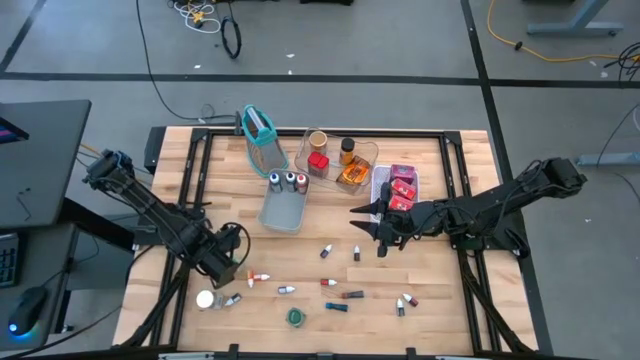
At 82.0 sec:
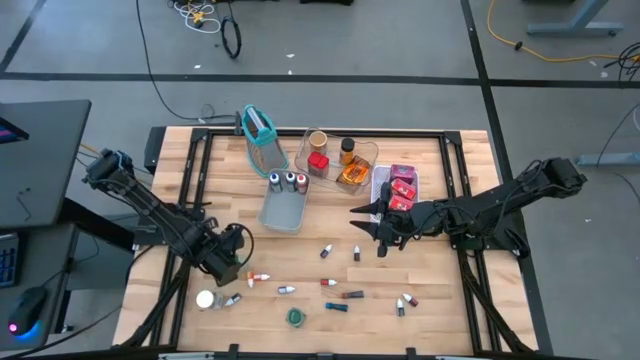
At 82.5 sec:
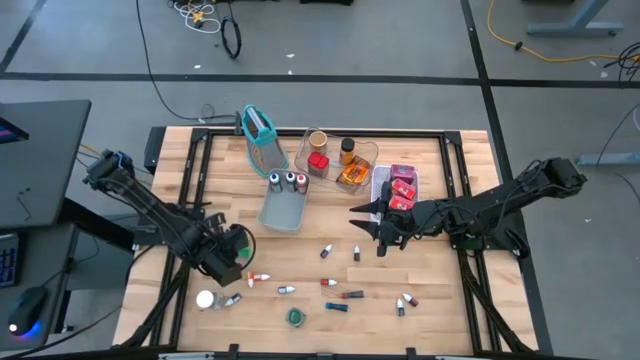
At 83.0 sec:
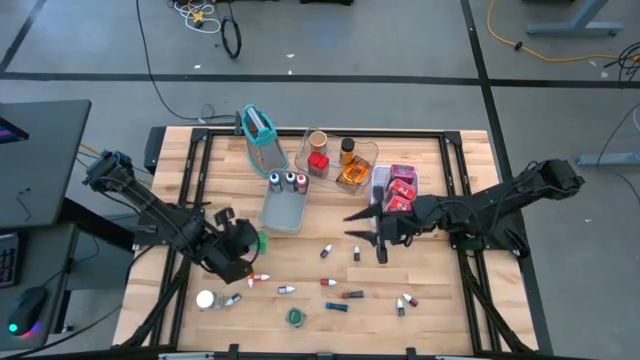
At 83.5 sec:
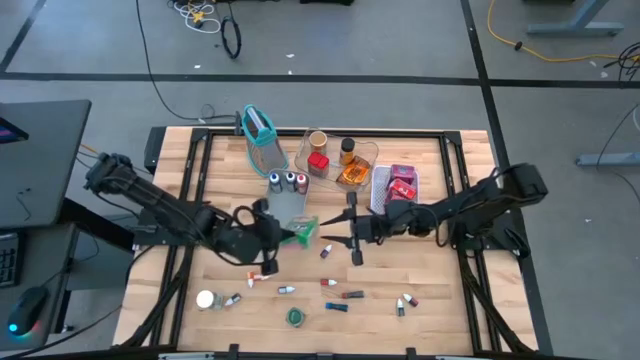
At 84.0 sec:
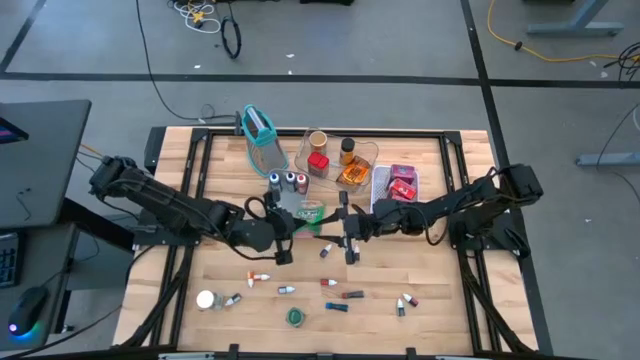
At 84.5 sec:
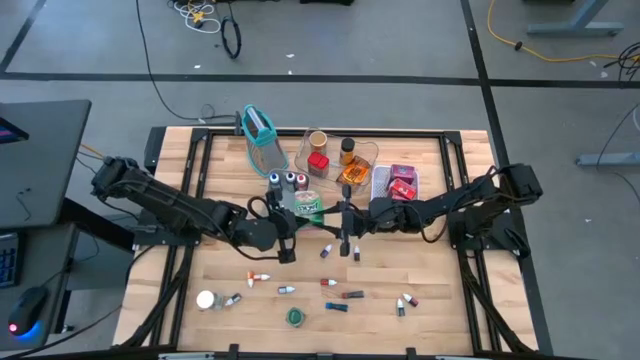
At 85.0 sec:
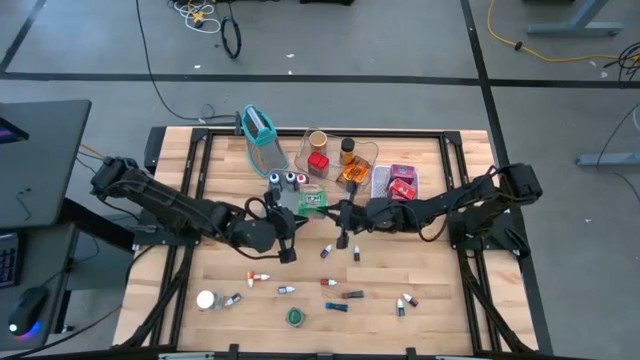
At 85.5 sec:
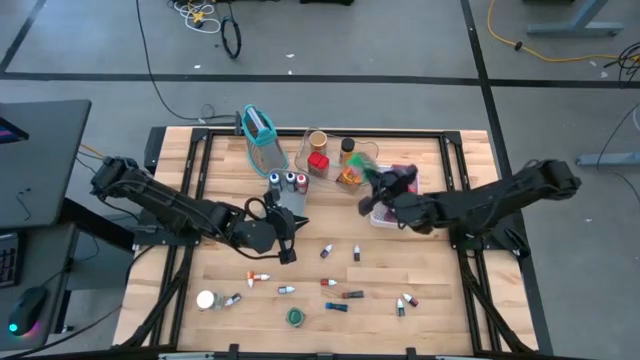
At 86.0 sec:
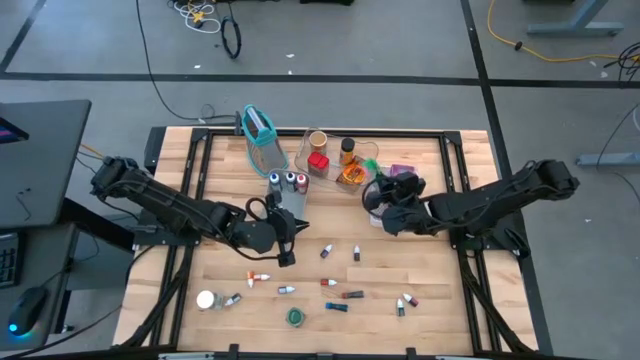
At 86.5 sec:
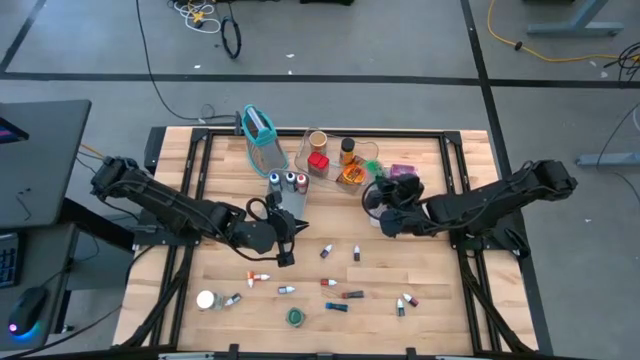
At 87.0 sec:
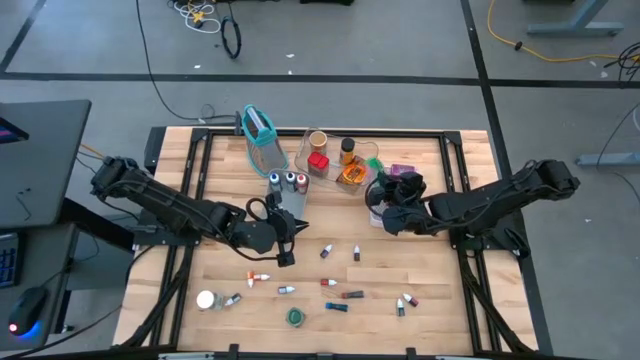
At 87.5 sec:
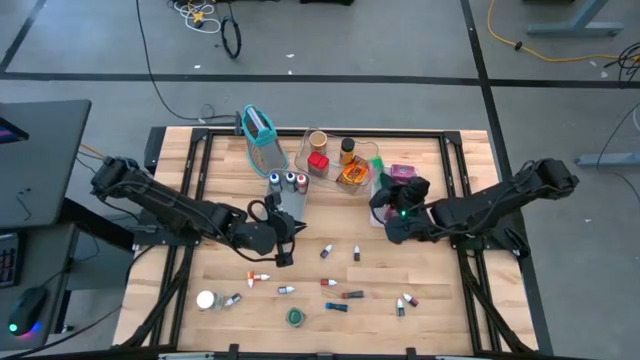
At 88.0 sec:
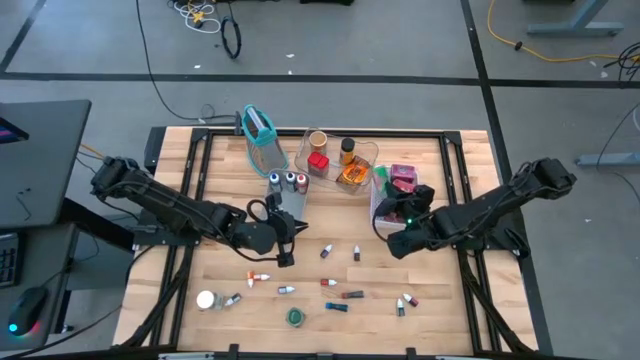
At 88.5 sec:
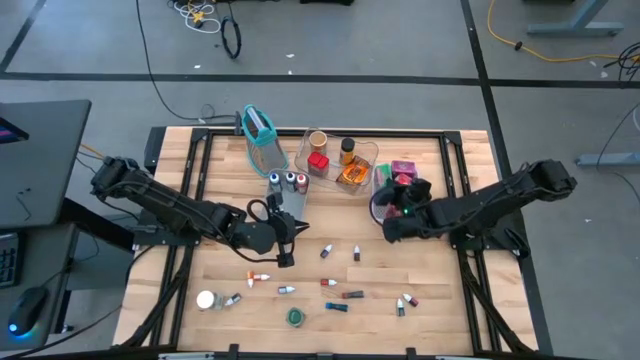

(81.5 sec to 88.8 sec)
Task: Pick & Place Kitchen Items
Put the green cereal box into the white bin

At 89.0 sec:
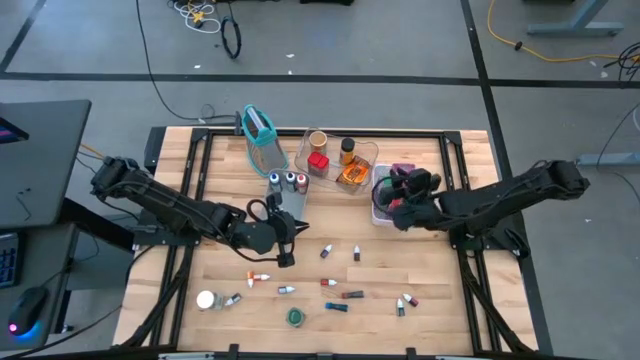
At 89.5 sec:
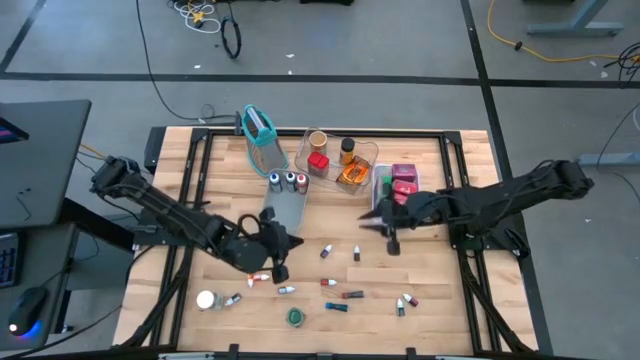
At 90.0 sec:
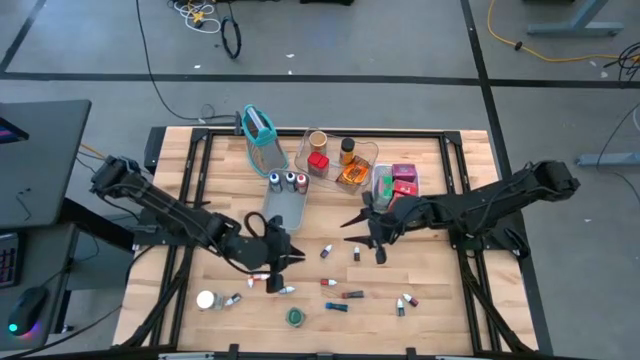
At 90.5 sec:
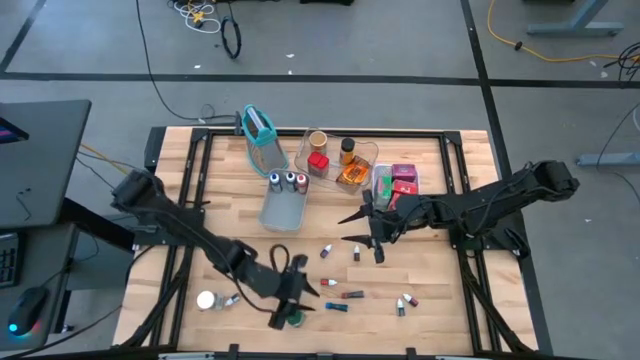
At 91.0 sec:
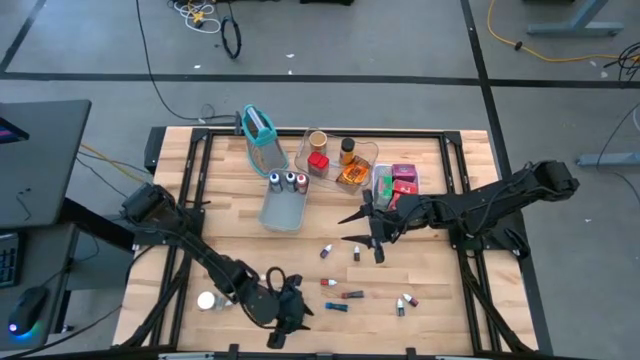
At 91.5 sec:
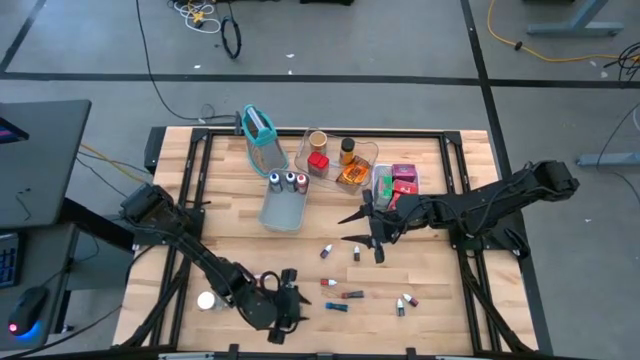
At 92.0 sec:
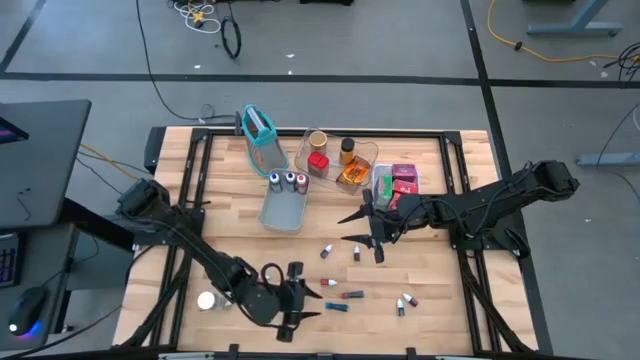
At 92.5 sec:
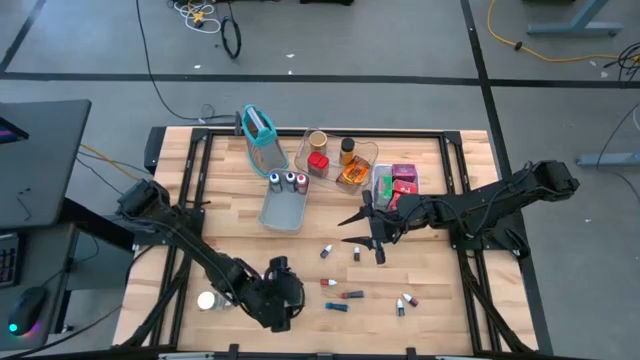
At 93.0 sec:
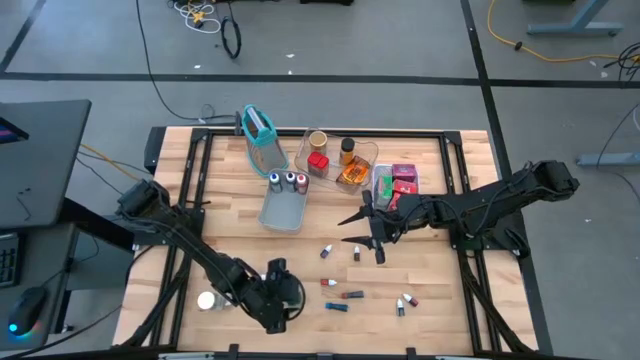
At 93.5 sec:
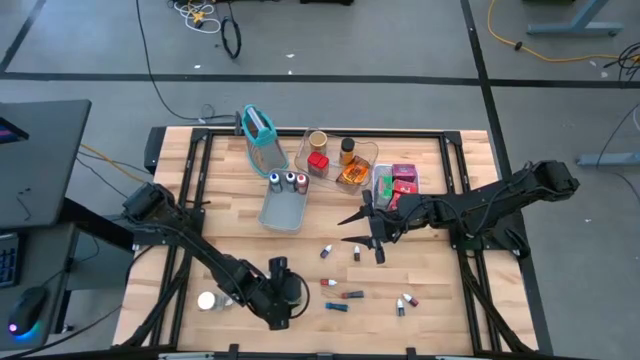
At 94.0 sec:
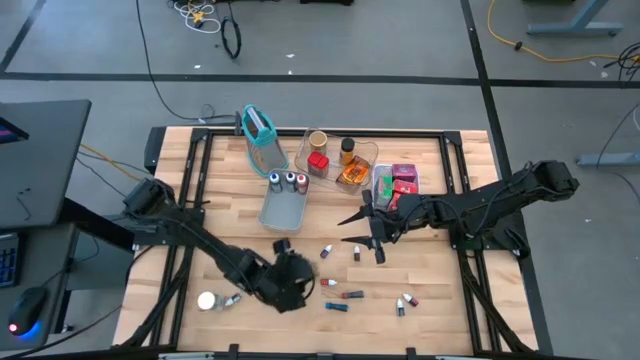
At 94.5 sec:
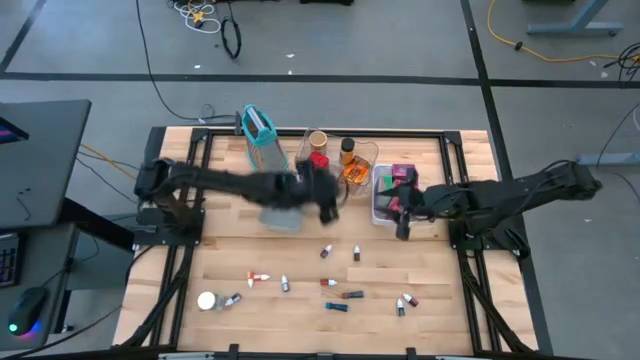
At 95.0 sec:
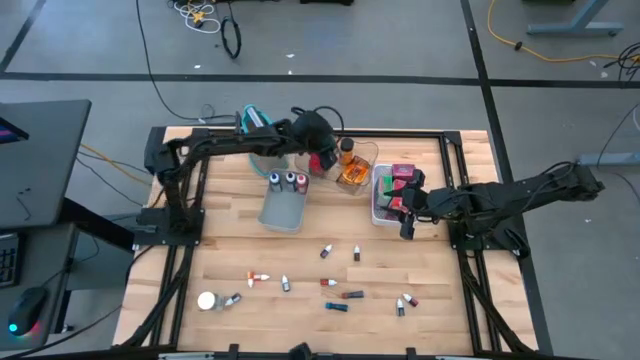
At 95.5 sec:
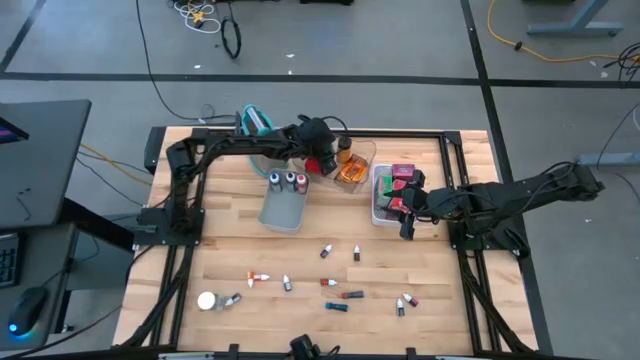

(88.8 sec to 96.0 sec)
Put the green seasoning bottle into the transparent bin

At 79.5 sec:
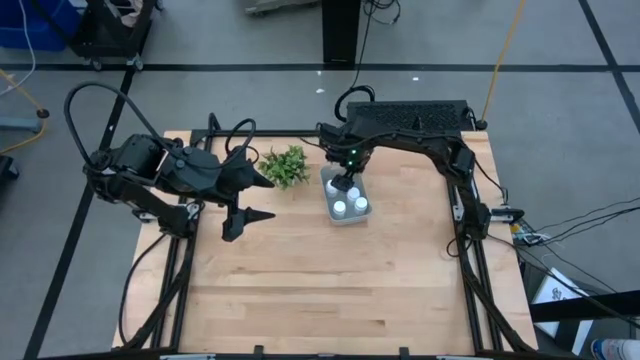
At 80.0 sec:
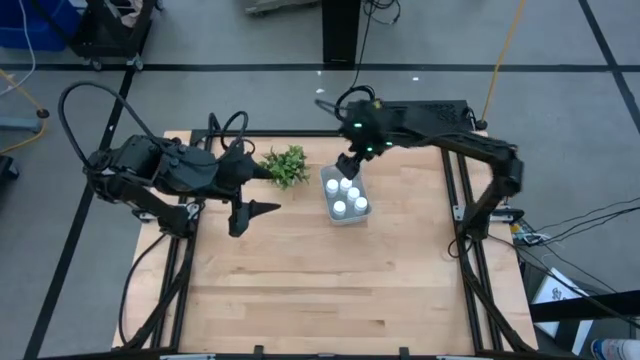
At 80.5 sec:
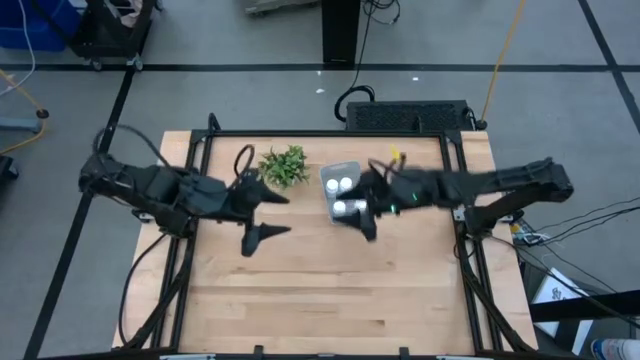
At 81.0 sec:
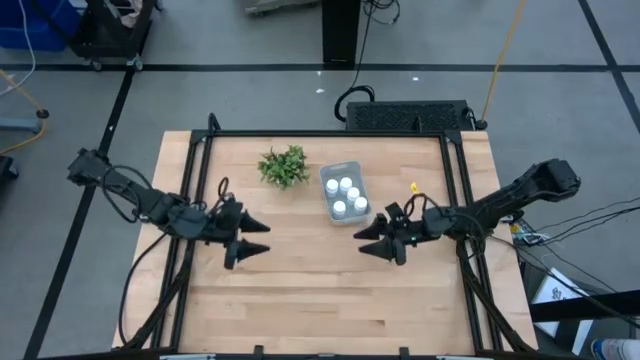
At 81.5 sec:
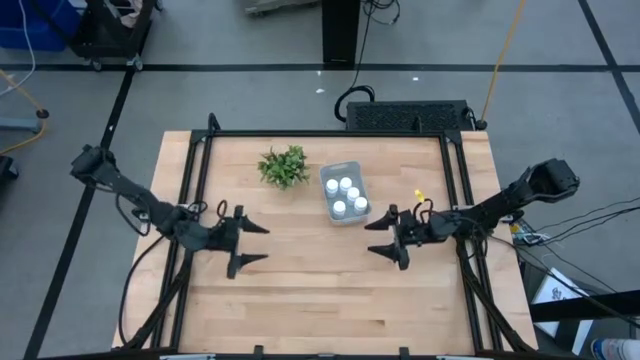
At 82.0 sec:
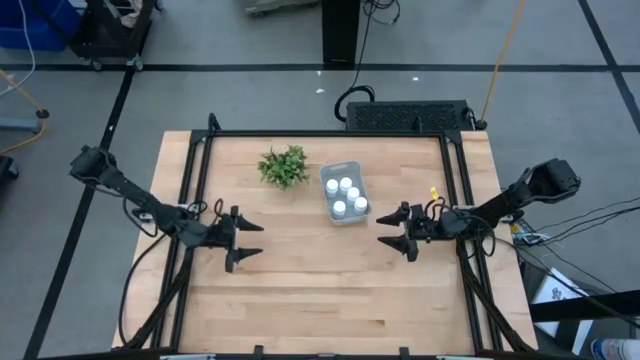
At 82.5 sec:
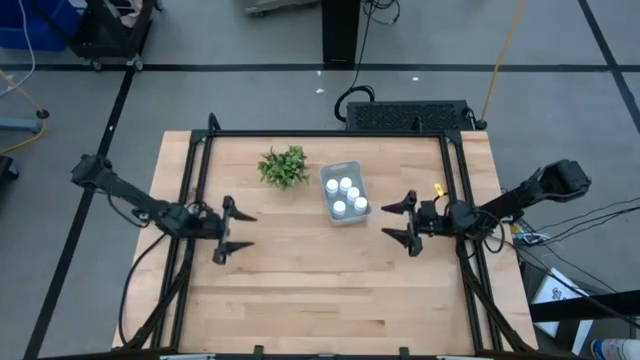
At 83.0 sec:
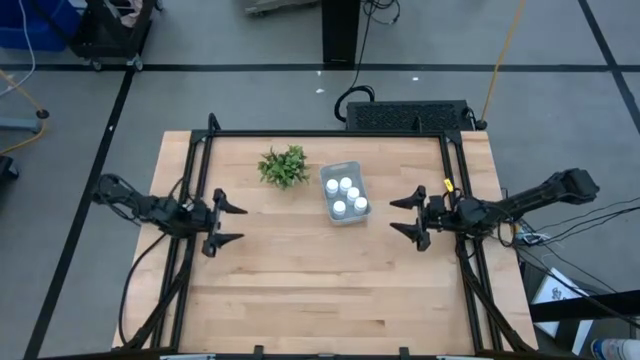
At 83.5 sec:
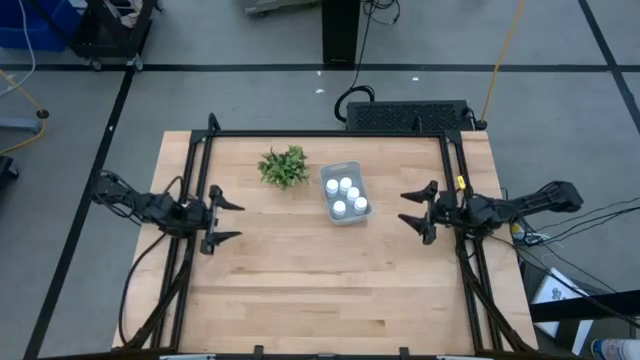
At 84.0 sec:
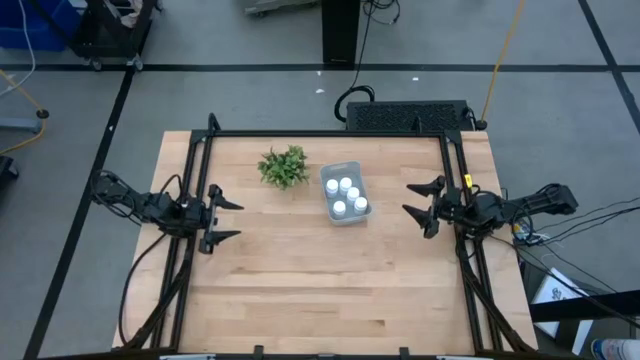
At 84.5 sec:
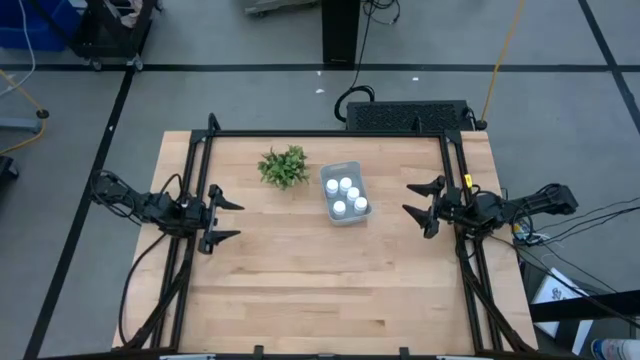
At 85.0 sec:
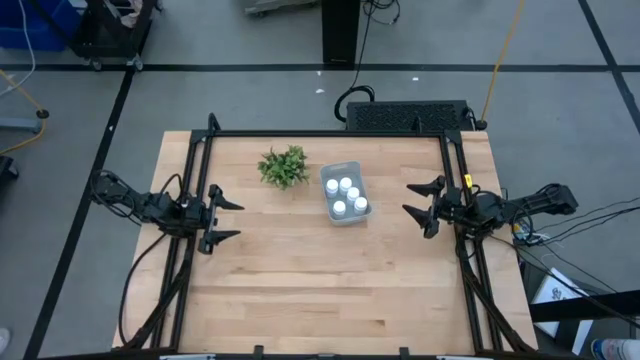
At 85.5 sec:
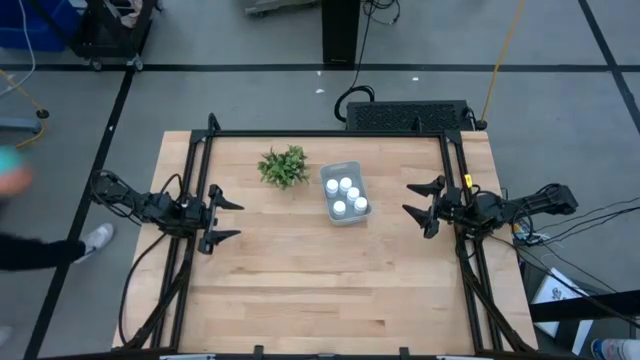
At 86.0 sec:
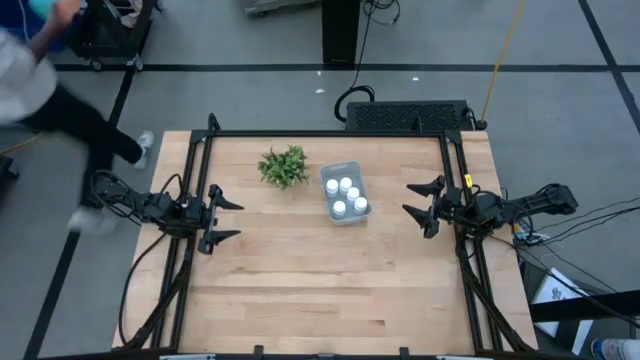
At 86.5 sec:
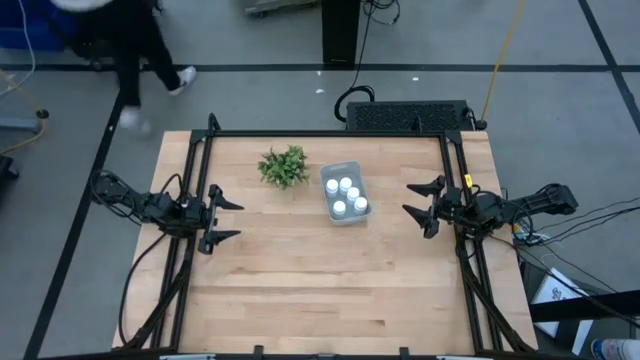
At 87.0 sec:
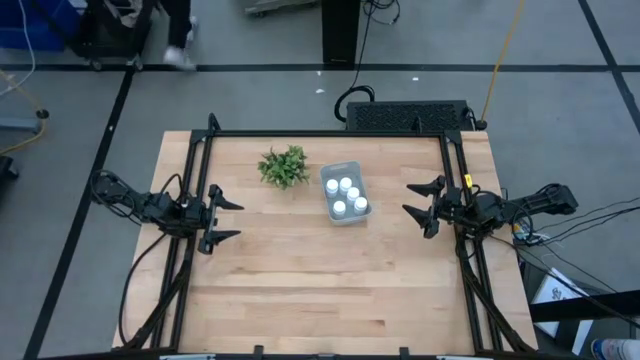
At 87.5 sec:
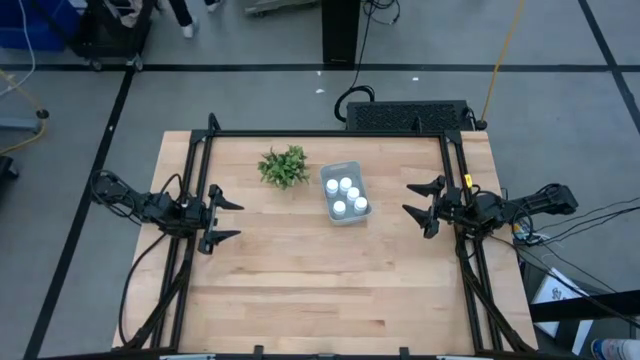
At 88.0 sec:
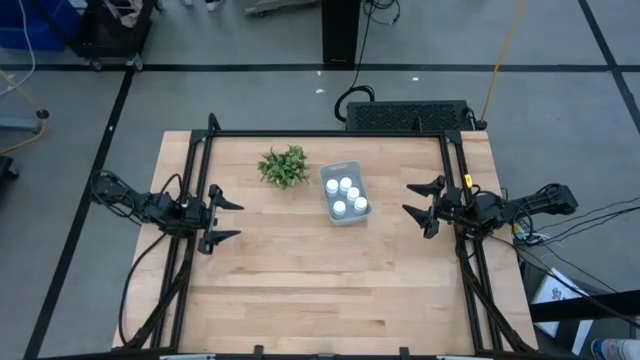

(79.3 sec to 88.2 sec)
Task: Pick and place pill bottles into a basket
Return to Home Position
